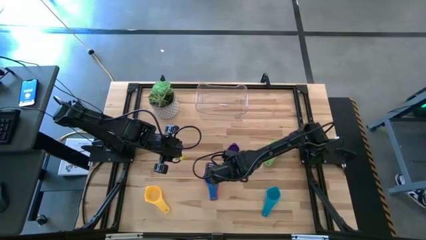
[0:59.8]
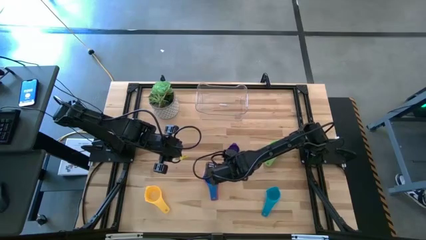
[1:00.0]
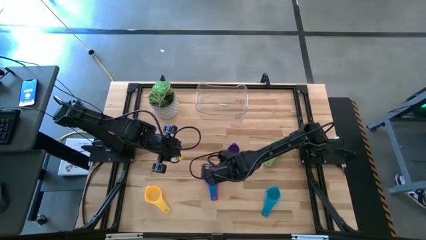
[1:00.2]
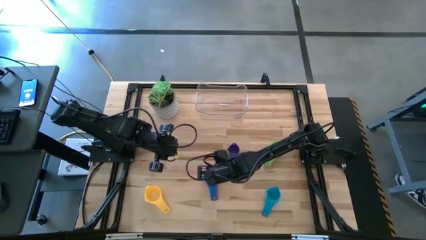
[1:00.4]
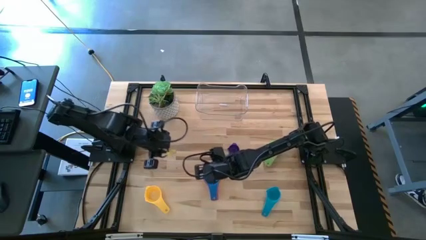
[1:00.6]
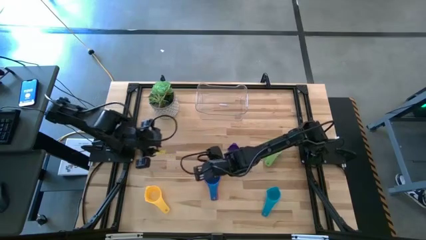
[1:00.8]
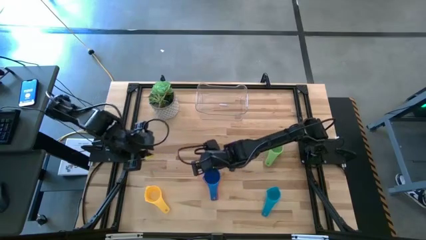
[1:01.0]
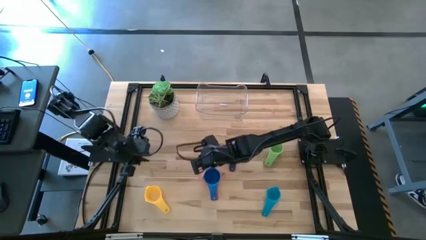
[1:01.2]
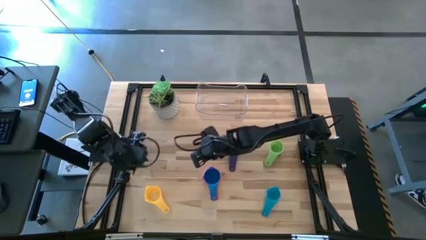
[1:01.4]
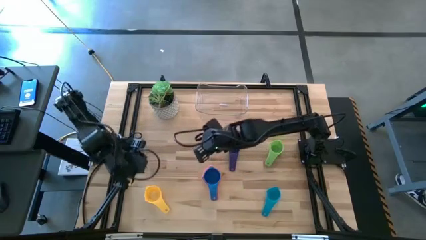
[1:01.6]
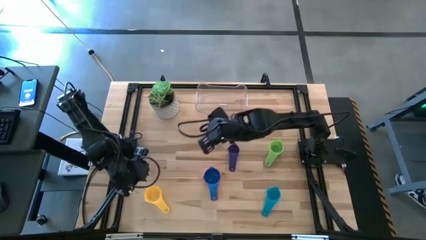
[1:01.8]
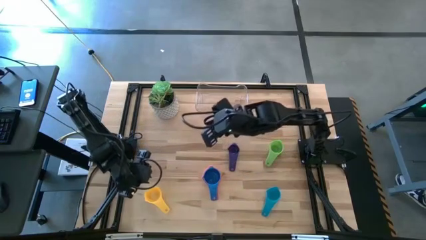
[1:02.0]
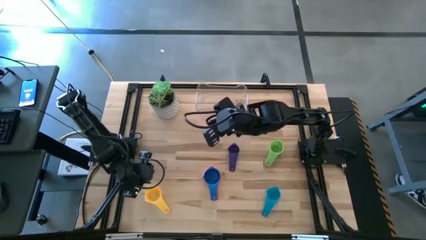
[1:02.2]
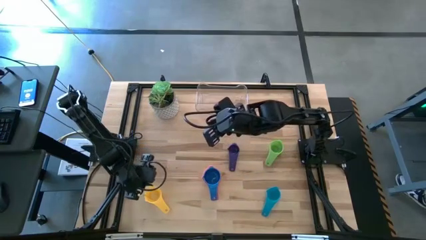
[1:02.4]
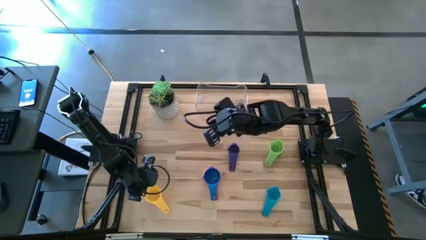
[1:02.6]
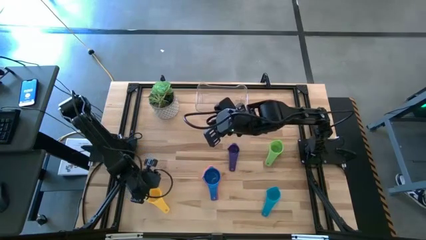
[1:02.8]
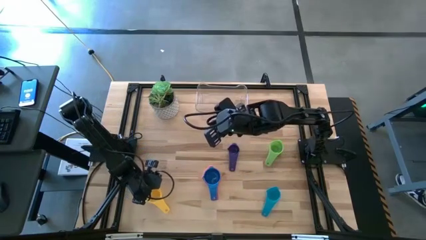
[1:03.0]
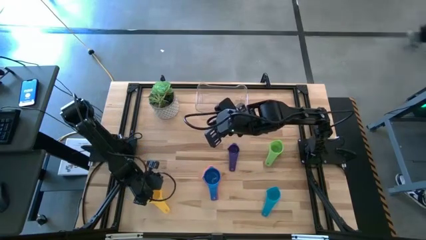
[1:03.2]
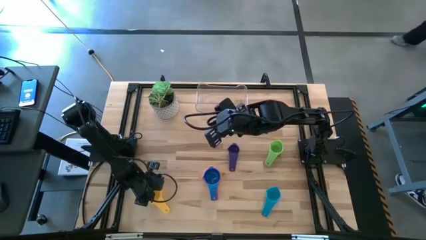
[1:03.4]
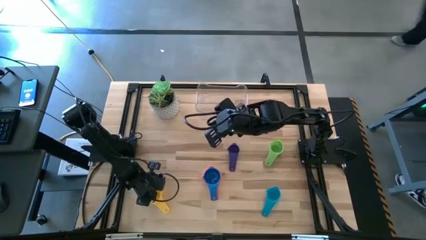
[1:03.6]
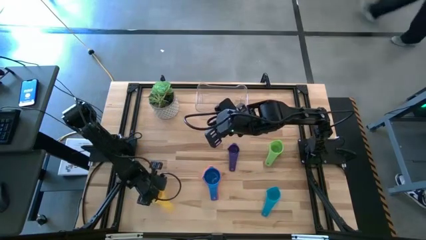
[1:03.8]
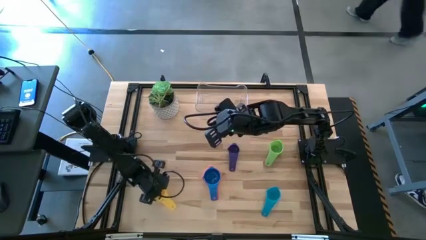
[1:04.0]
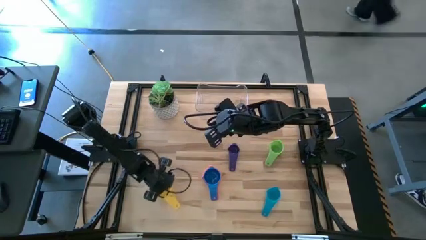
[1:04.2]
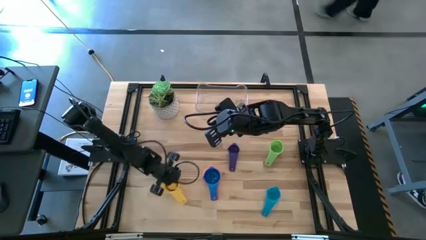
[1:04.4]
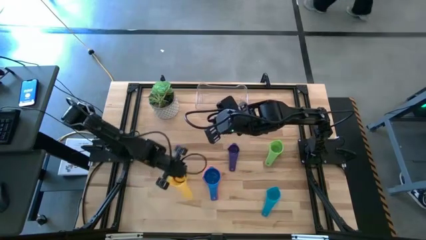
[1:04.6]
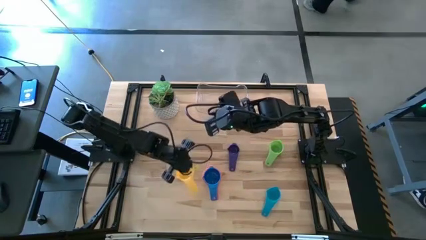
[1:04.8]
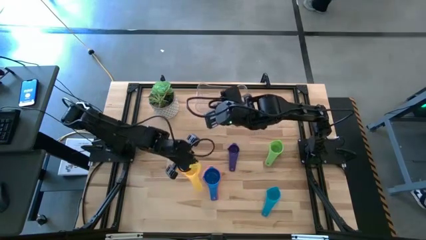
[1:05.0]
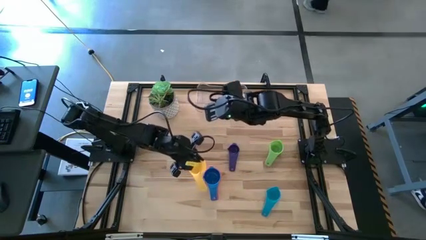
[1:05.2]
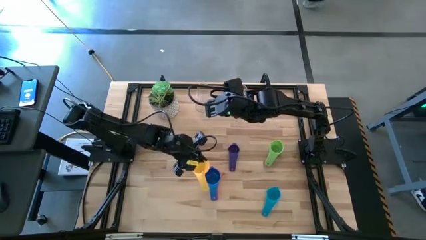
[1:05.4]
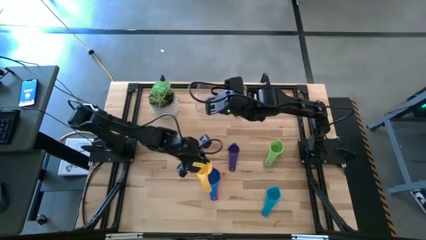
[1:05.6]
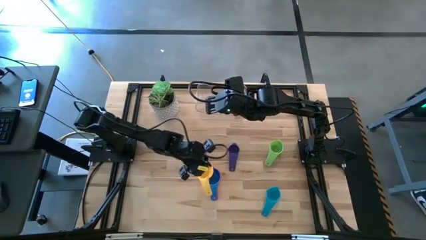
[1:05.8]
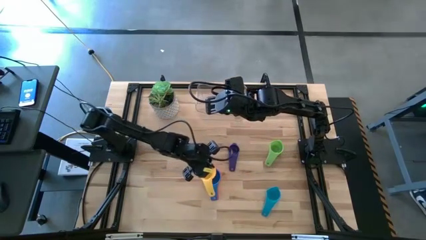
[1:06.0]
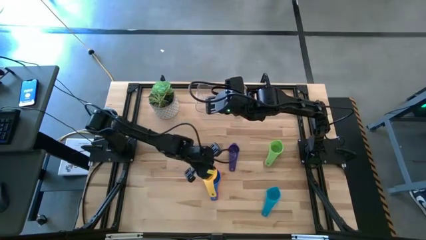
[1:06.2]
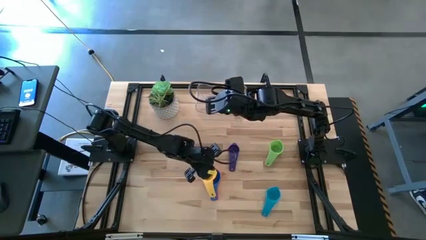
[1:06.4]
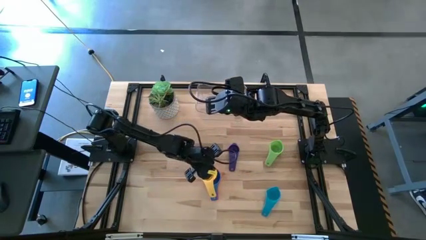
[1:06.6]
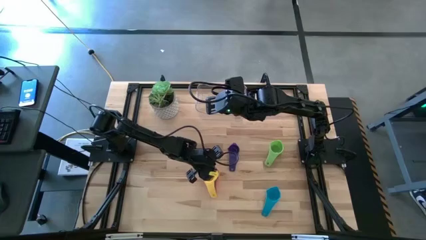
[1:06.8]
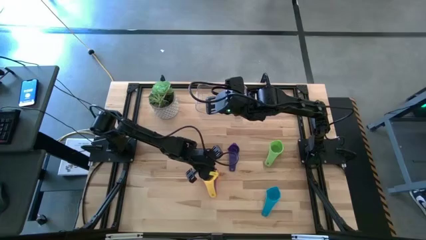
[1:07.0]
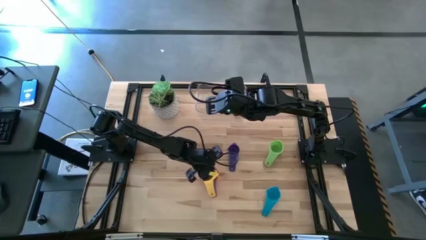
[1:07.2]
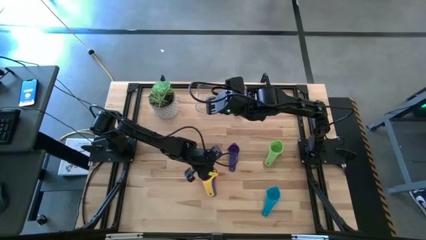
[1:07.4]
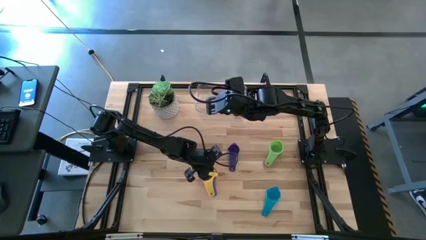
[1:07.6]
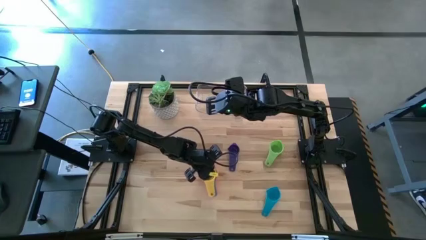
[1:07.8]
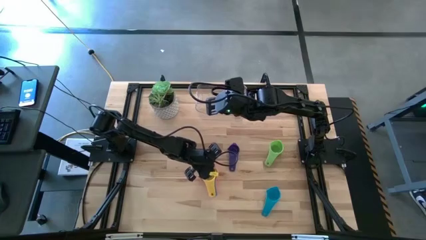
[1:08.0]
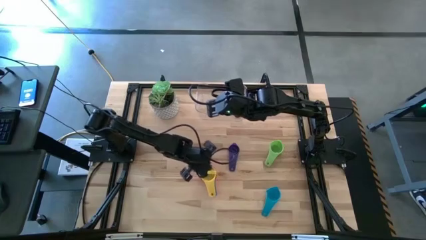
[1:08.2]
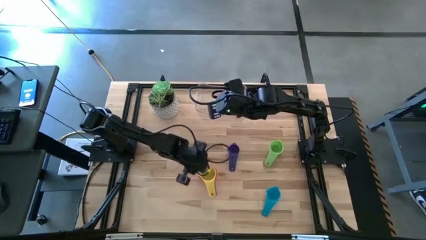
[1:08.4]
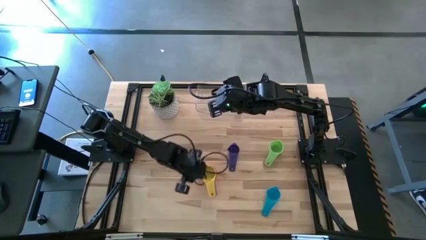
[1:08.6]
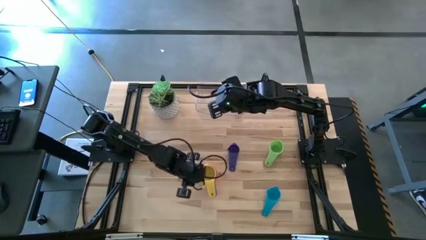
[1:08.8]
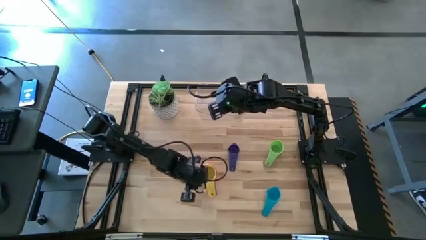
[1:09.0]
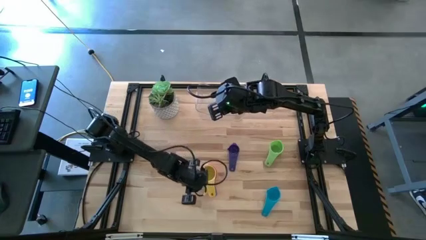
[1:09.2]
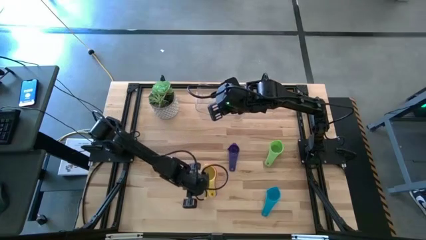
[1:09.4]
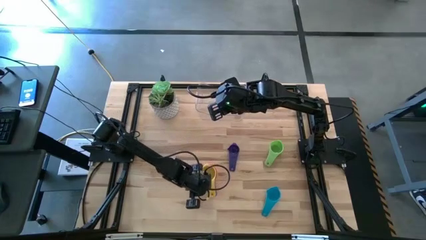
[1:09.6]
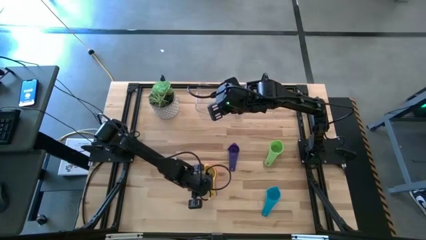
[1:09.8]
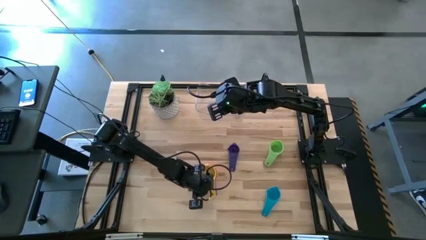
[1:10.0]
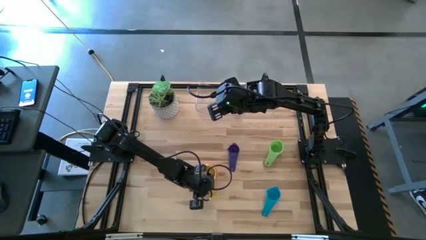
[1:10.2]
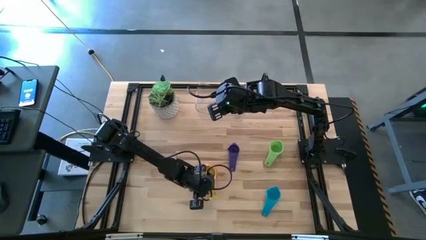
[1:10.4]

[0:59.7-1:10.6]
Task: Nest measuring cups in basket
Stack the yellow measuring cup into the light blue measuring cup

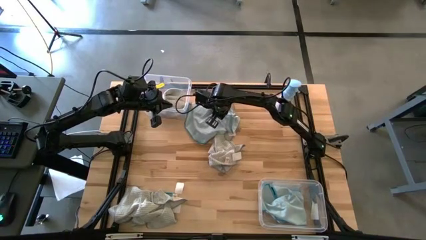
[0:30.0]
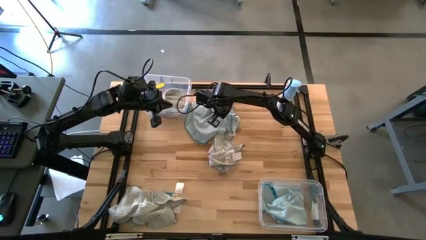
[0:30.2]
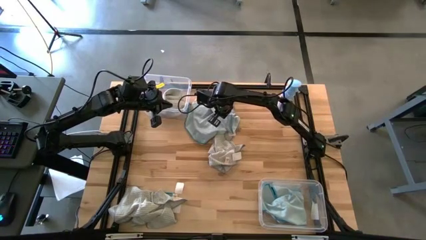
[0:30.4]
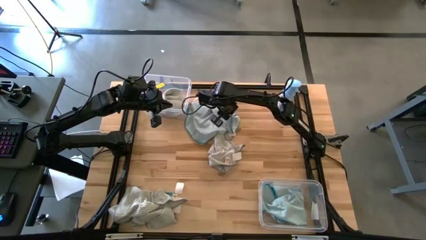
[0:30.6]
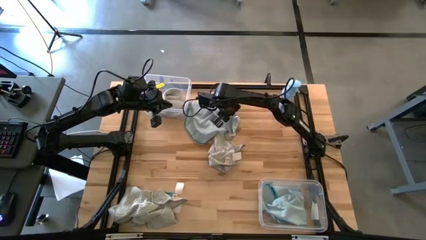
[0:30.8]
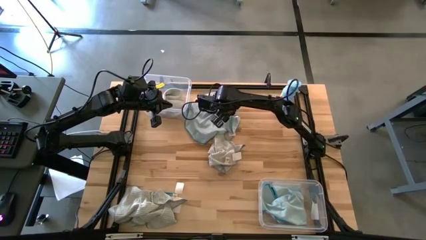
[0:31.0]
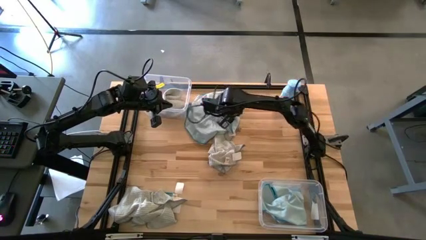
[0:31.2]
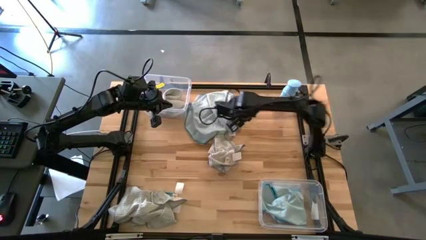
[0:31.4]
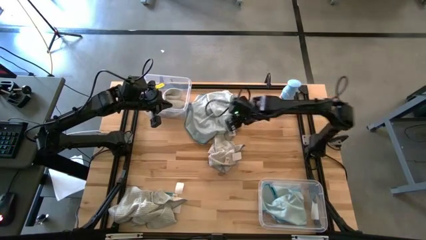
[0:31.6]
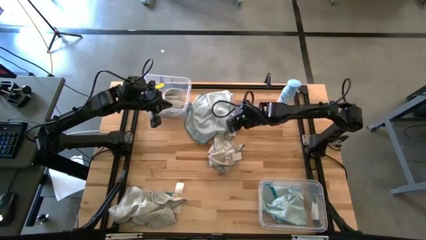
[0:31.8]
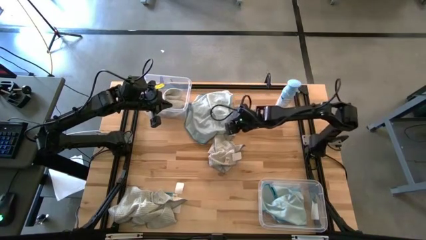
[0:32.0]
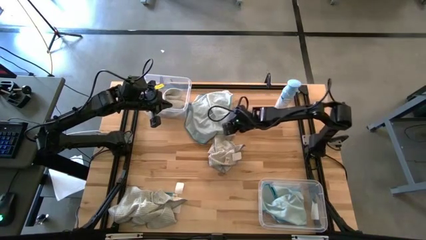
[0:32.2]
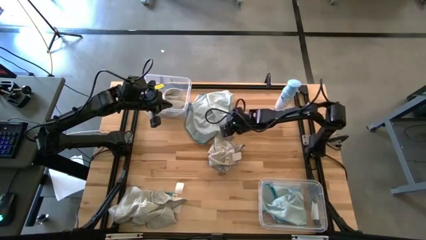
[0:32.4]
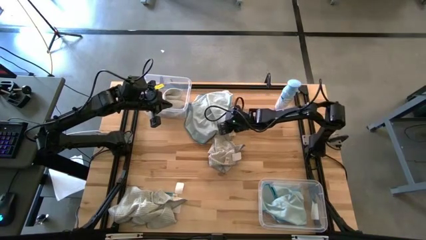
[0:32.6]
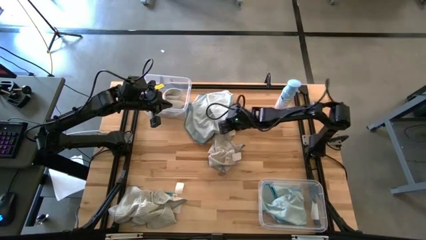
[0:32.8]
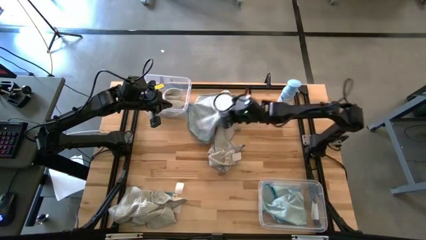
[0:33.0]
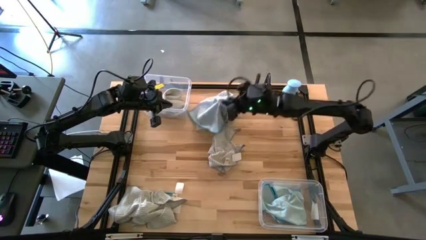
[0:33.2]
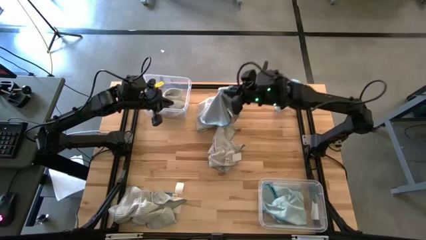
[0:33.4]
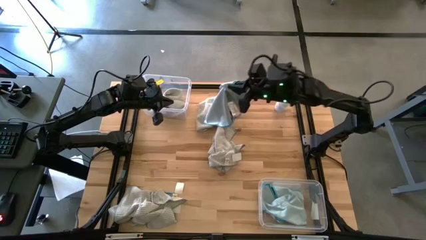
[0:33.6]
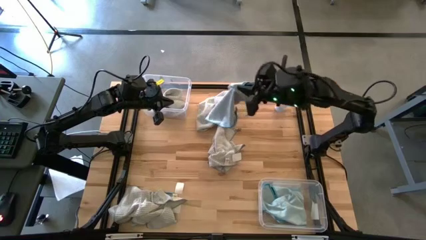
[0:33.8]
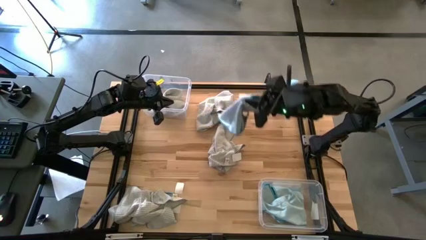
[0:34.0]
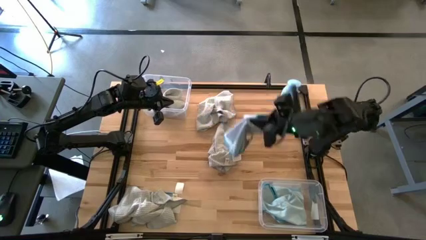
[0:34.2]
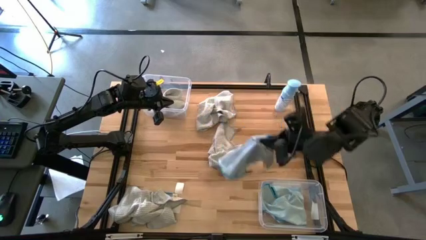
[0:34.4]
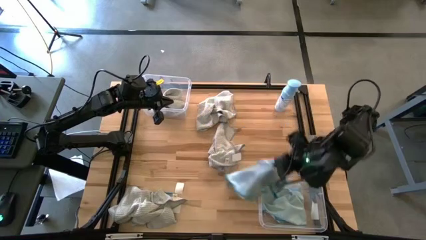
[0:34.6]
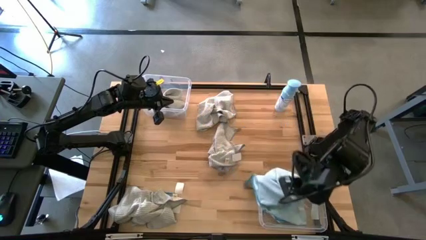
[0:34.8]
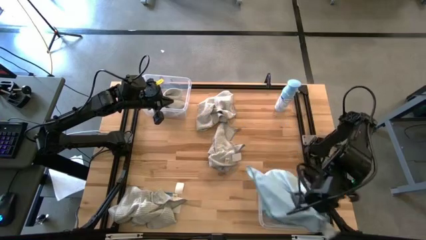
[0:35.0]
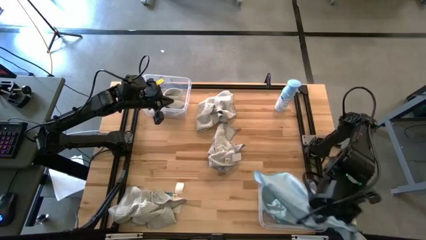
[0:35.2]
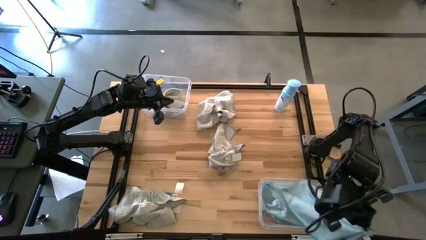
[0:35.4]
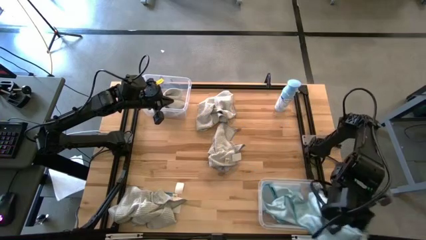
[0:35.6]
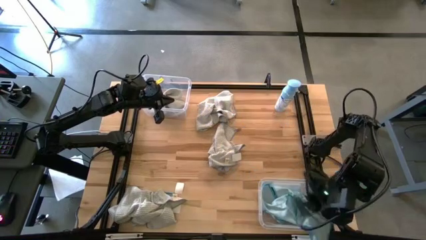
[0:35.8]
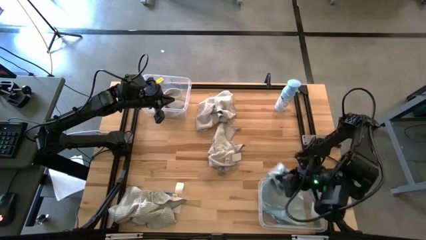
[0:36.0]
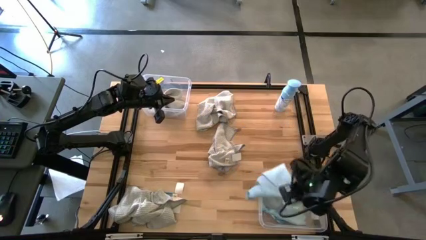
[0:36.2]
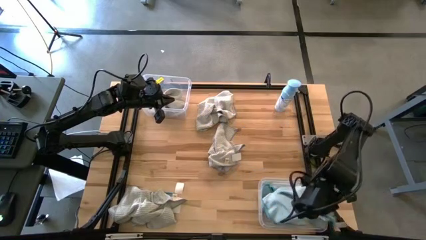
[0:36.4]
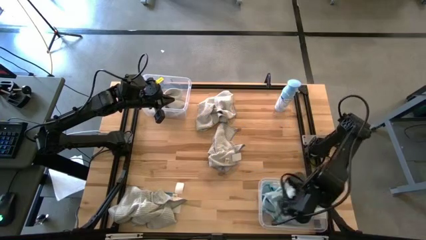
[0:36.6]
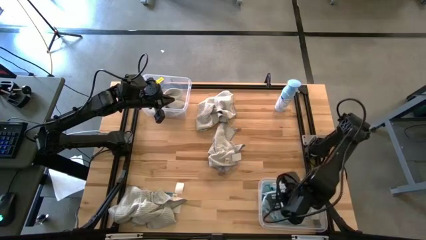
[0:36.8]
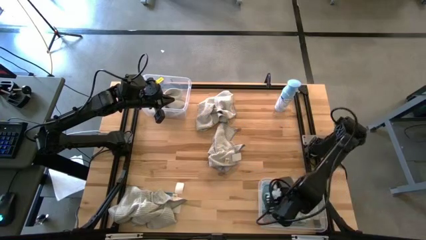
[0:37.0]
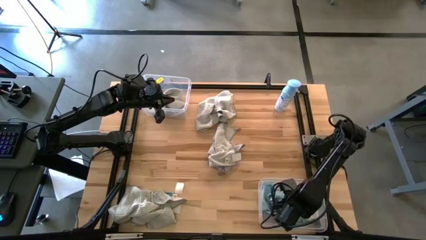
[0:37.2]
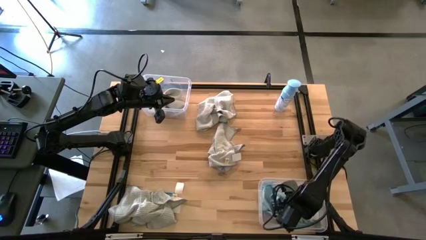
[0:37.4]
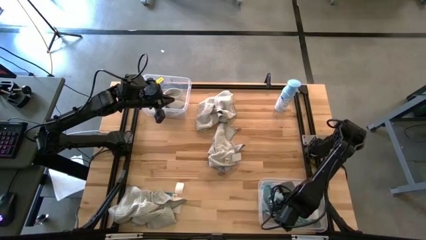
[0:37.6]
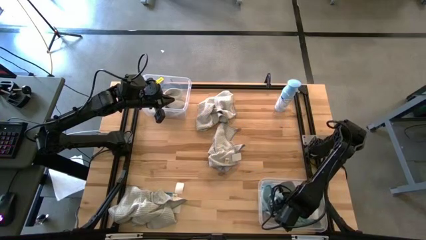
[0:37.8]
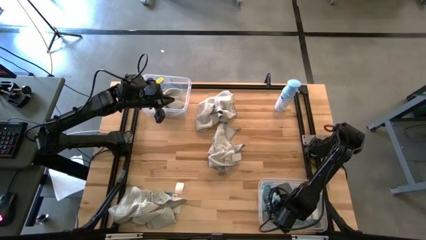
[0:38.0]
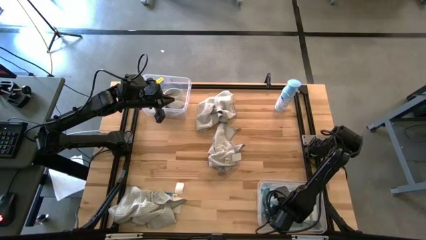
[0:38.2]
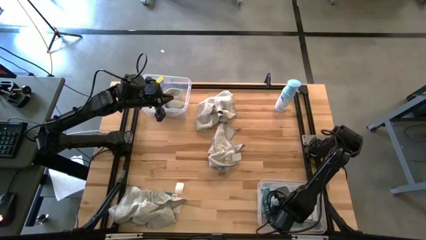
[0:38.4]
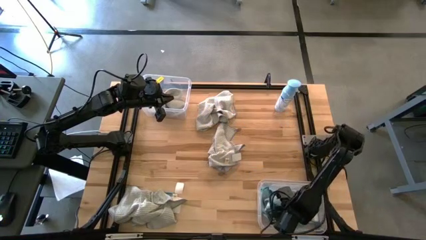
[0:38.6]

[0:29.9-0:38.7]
Task: Sort microfiber towel by color & place in baskets
Put the top blue microfiber towel into the bottom transparent bin
